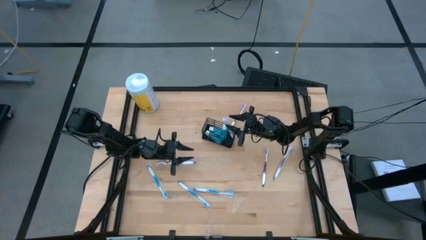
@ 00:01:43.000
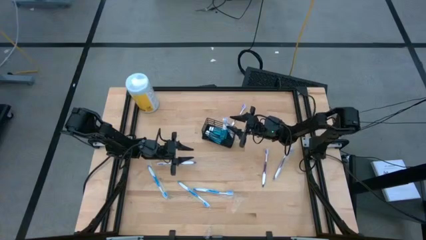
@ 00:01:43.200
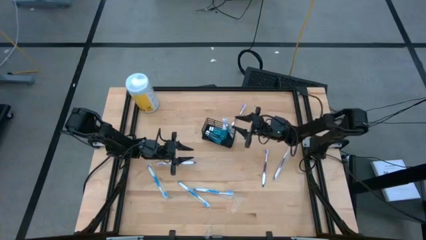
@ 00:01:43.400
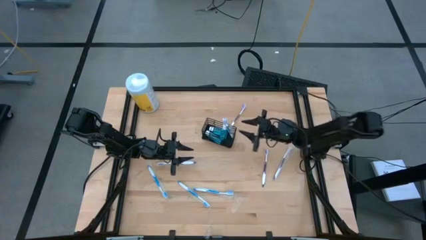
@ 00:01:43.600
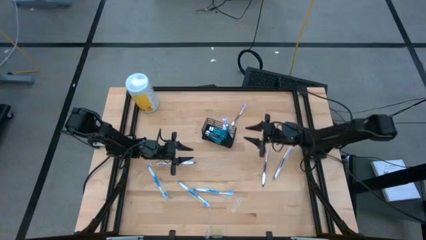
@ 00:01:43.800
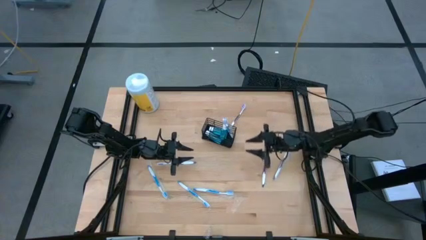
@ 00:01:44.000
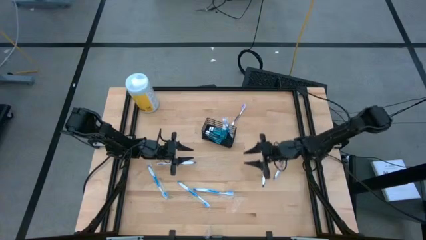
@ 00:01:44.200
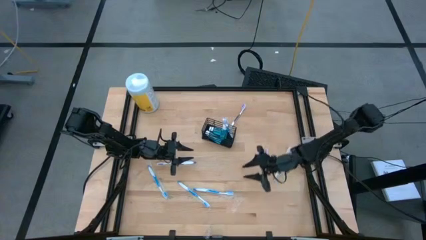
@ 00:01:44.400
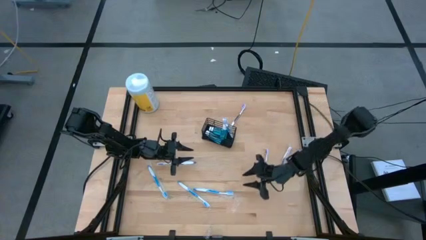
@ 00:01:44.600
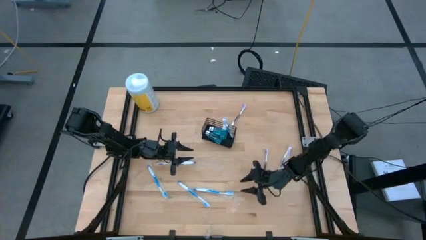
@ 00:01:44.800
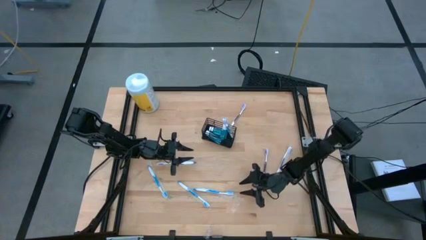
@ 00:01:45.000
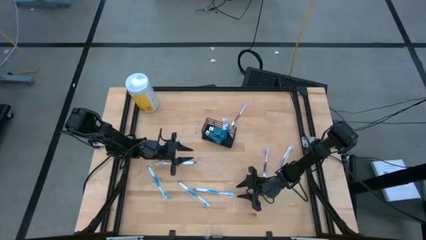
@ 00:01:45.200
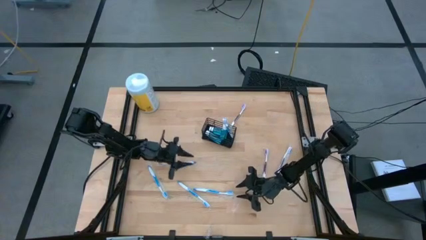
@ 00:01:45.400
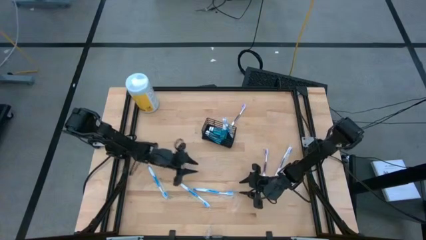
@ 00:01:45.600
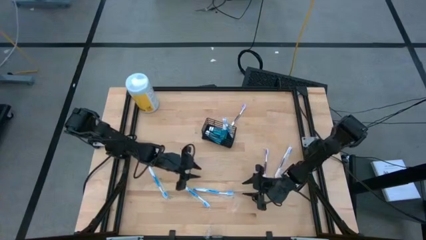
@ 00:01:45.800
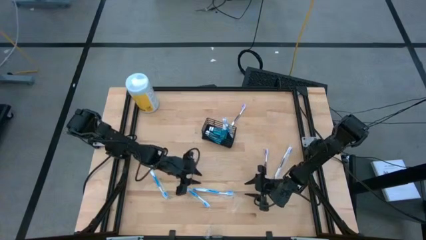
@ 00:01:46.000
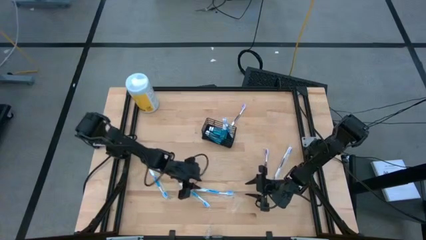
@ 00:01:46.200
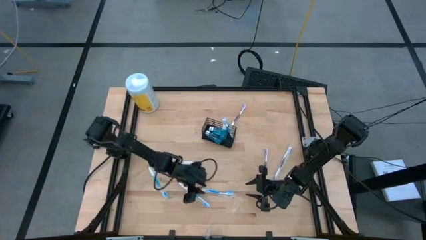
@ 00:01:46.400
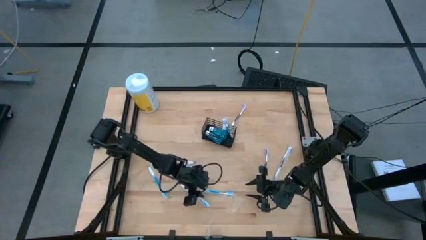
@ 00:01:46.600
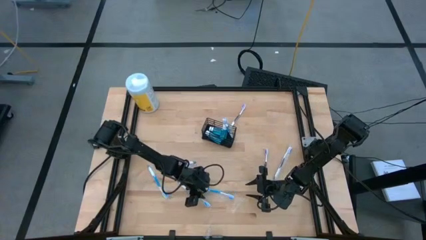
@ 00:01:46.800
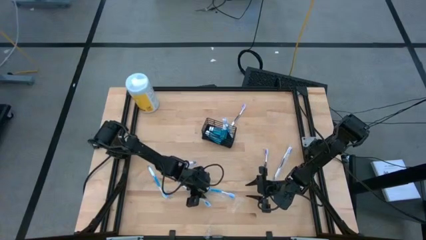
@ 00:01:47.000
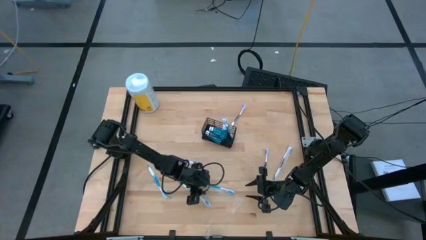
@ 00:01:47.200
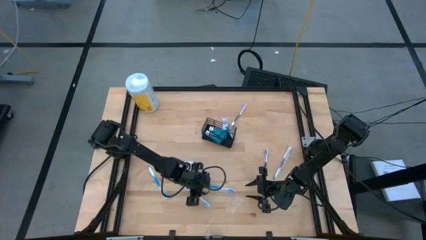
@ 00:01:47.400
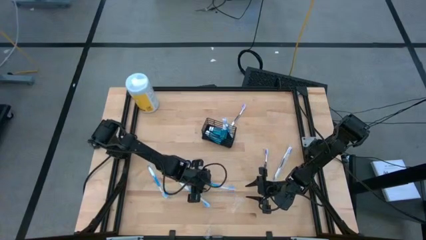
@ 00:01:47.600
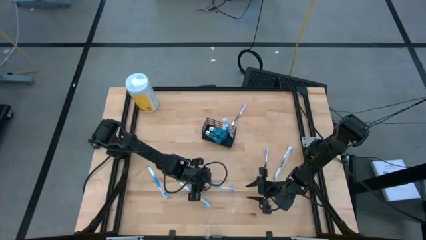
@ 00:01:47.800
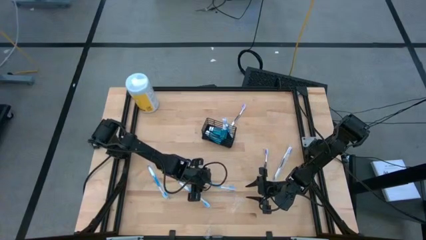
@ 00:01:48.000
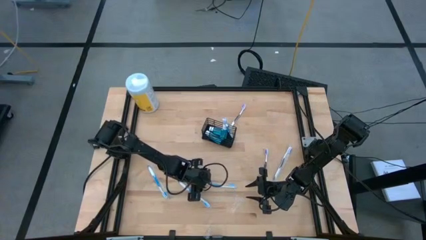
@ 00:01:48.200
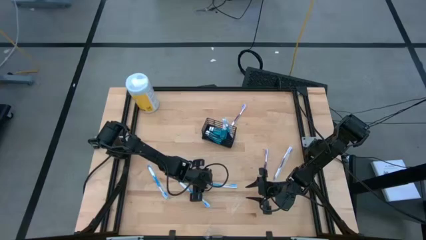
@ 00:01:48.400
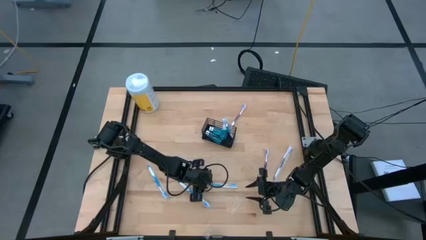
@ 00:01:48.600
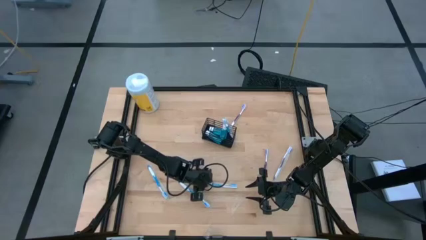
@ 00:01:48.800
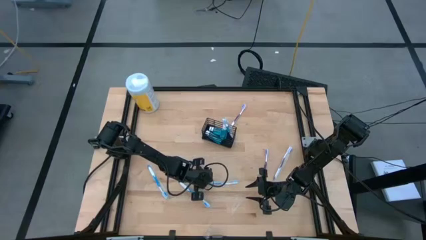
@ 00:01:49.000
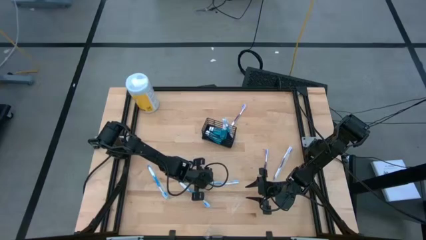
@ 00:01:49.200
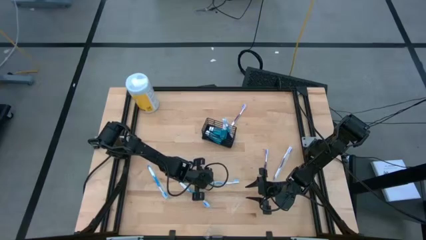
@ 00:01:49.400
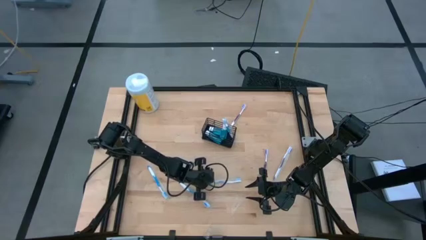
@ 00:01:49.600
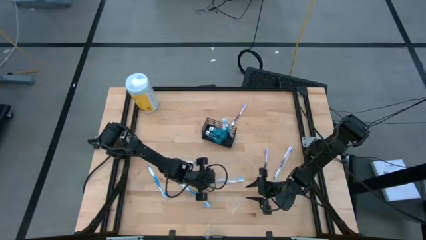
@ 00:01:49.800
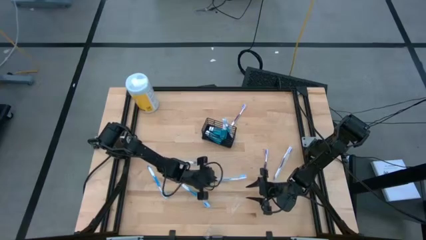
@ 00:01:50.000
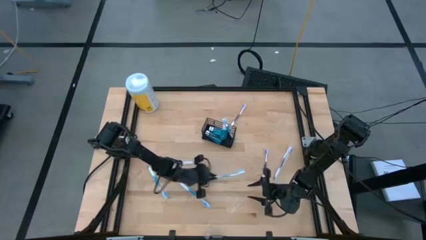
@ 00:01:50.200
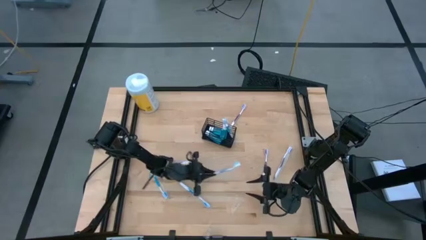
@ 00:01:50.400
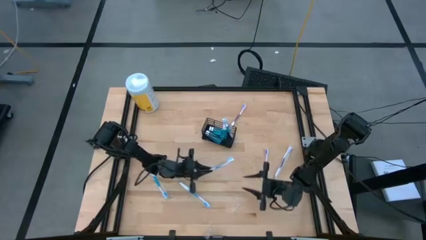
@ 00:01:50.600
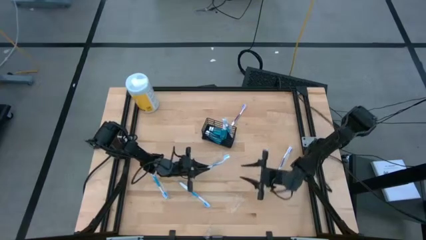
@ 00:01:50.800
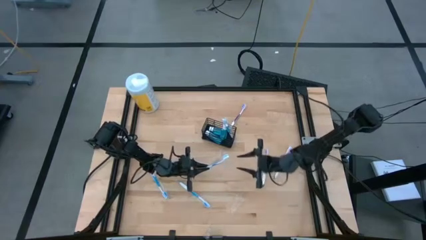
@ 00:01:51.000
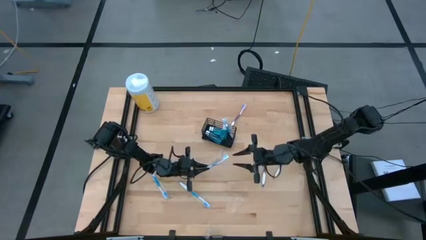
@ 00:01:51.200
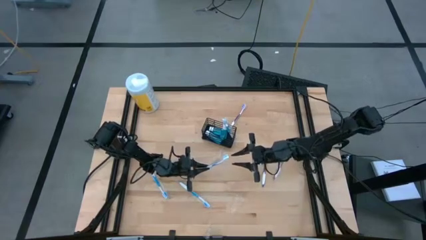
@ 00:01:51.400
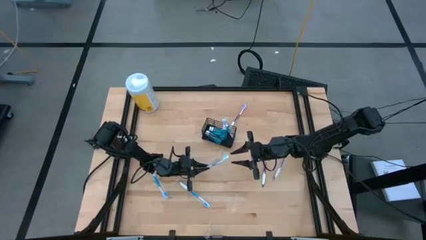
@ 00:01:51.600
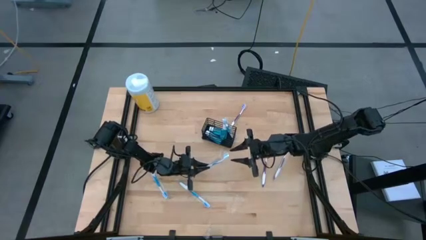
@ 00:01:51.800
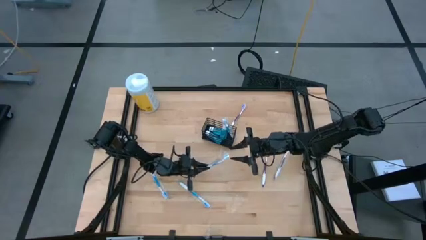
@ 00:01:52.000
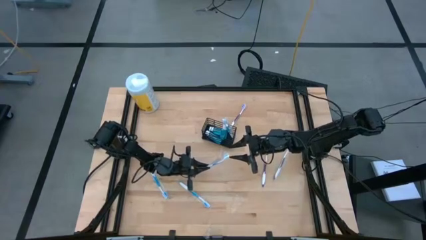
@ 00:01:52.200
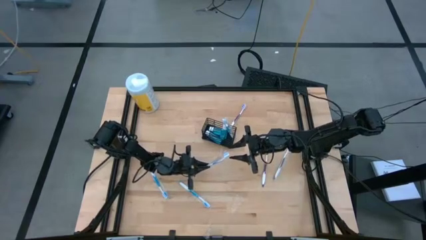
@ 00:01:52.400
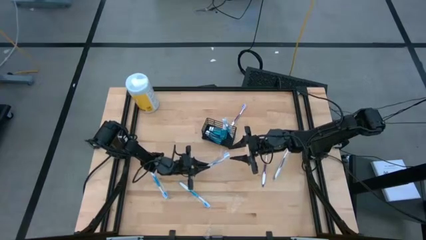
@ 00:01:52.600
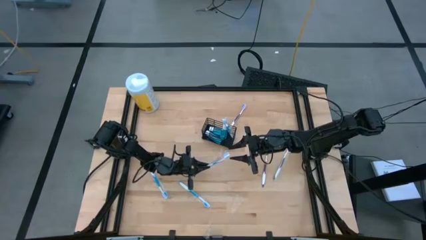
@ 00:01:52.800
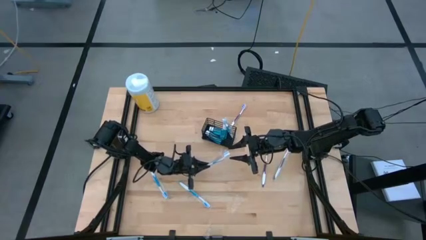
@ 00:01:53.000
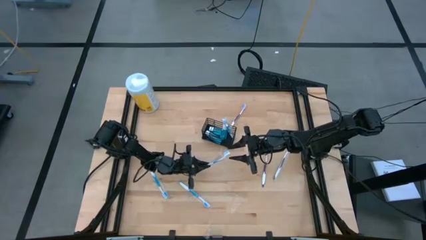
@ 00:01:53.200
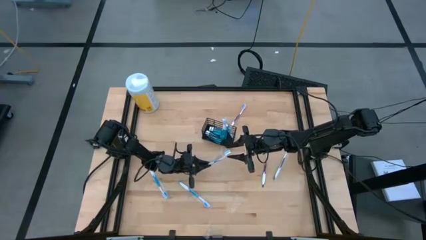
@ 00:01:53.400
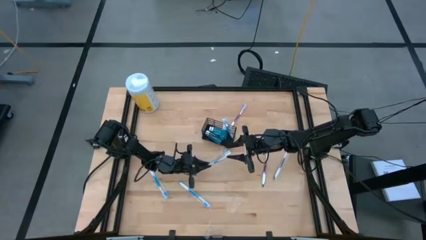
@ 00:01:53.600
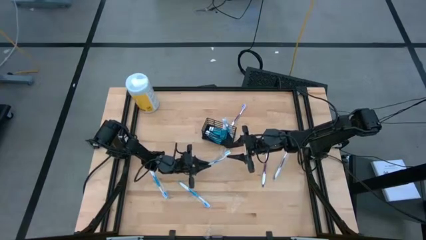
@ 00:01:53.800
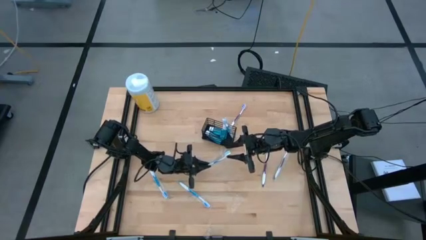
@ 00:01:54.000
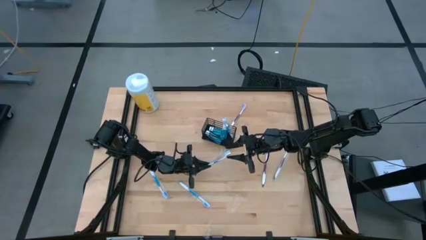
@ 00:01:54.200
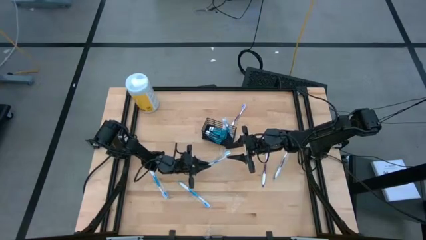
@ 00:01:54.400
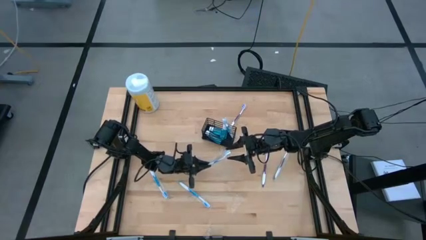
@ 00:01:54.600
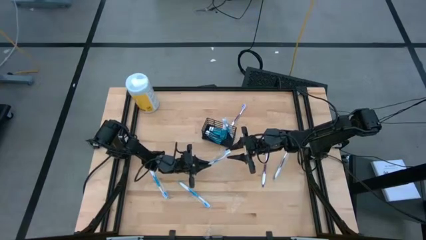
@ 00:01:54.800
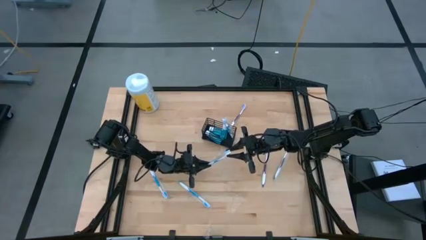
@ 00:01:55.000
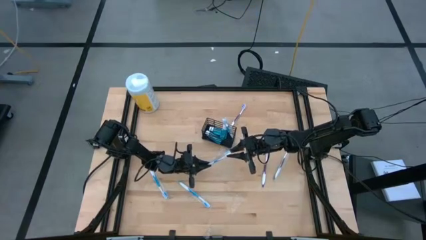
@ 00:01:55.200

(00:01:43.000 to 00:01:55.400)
Task: Pick & Place toothbrushing station
Put the blue toothbrush into the wire organizer

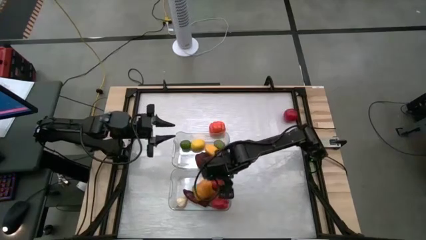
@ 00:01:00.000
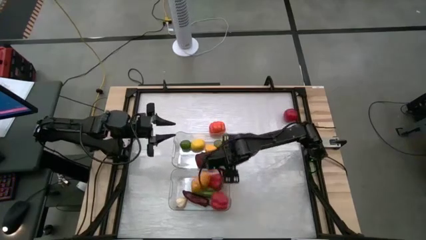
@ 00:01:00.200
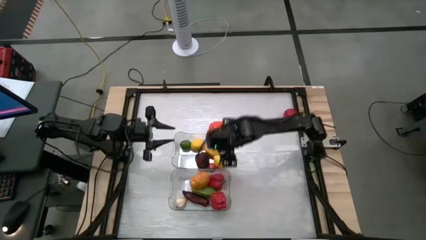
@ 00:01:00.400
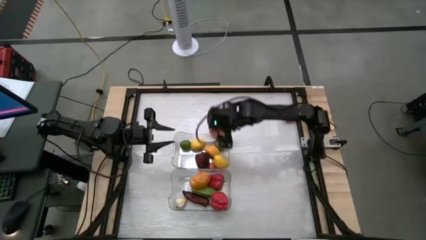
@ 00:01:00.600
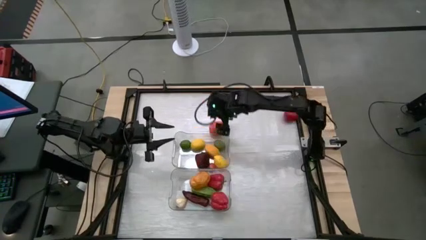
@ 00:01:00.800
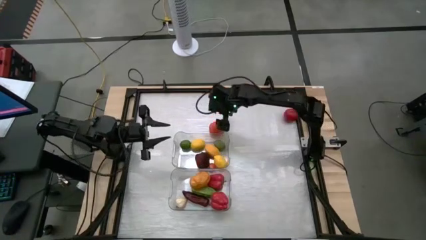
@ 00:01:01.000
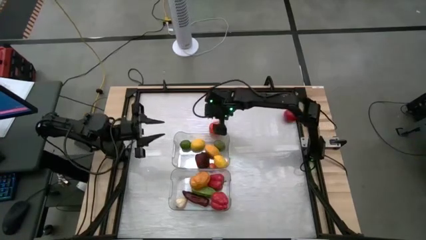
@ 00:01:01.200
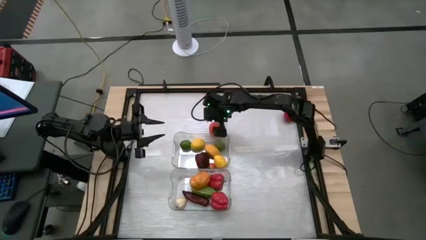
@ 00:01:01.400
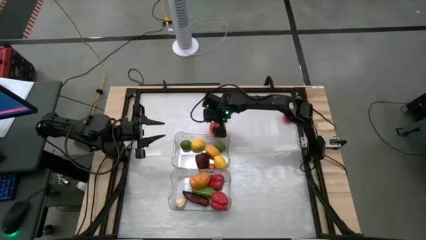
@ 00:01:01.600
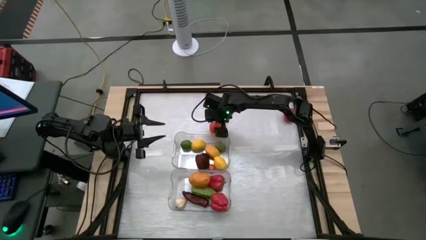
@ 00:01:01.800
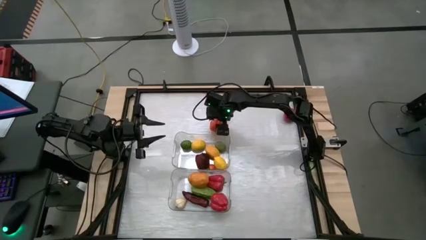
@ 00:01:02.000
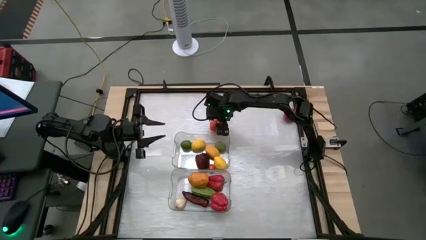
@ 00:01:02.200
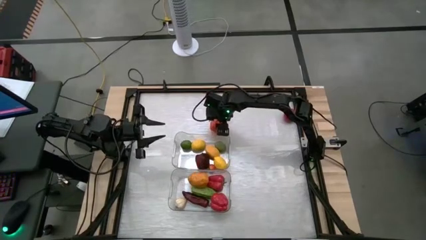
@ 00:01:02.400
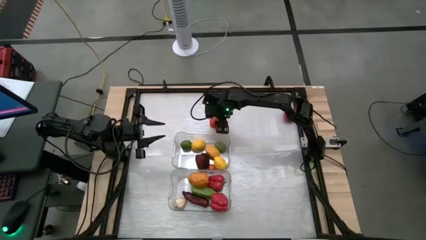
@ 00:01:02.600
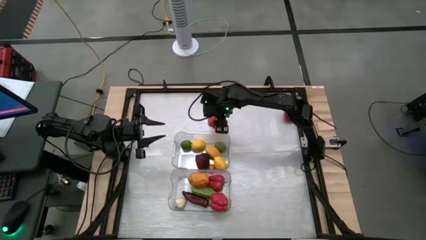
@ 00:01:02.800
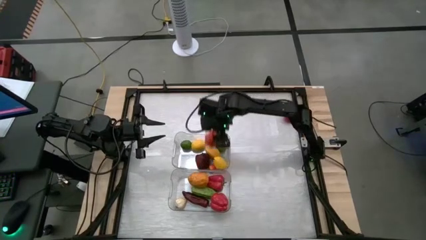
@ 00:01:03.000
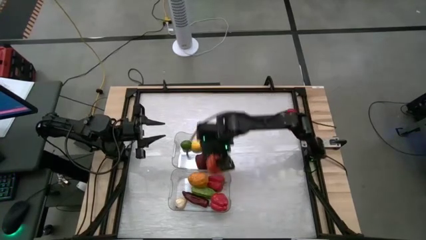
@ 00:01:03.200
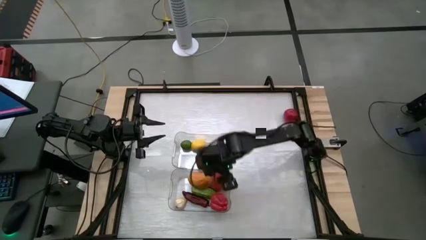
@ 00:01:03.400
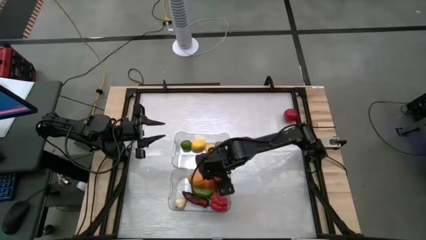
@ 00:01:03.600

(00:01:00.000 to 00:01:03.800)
Task: Sort produce into baskets
Put the pumpkin into the bottom transparent bin

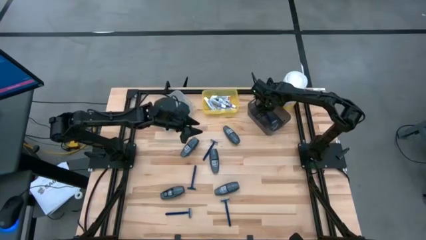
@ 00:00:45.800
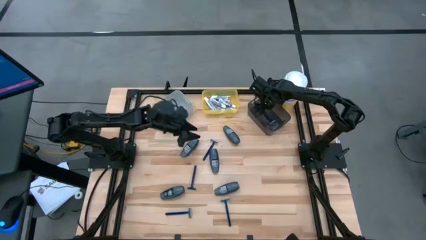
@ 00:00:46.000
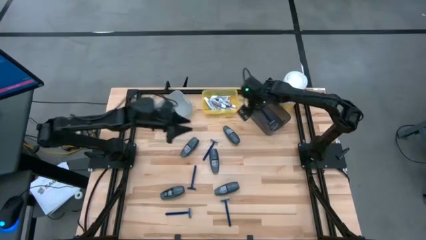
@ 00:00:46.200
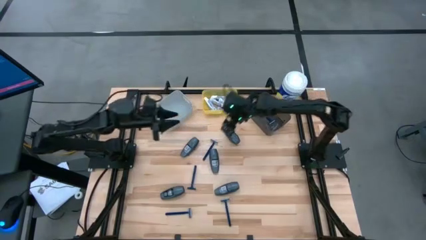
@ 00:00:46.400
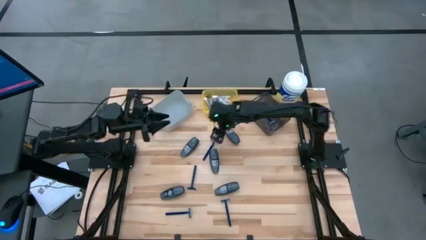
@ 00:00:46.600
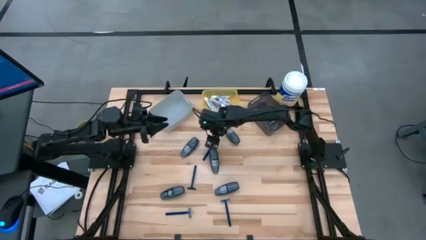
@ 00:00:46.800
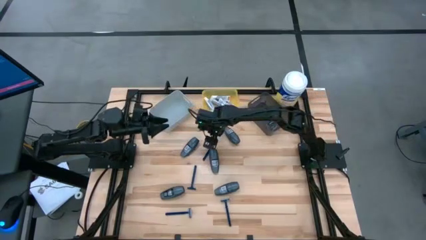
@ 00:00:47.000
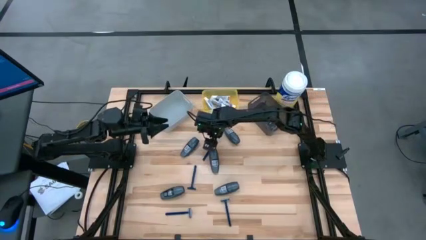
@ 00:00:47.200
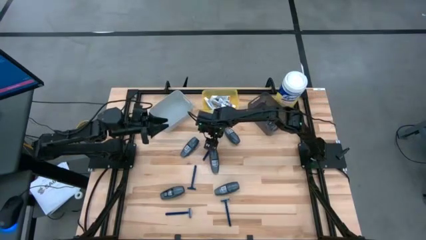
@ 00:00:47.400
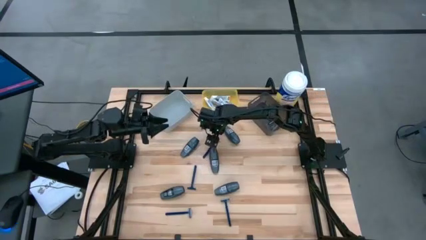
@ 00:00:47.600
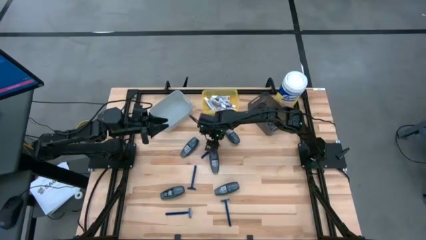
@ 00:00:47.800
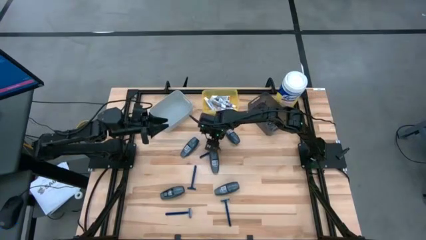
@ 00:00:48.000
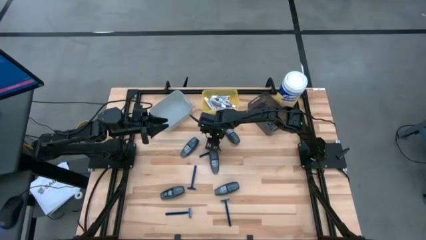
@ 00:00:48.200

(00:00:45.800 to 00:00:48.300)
Task: Pick & Place Travel size toiletries
Put the blue razor into the black bin
